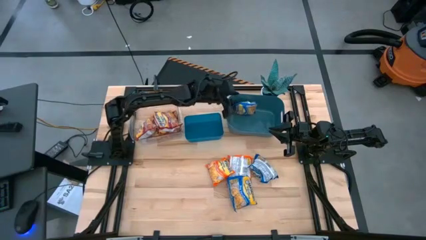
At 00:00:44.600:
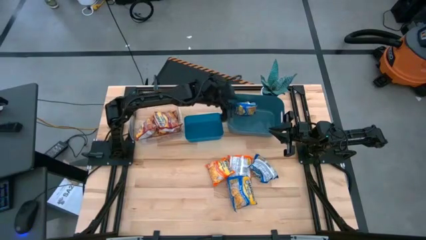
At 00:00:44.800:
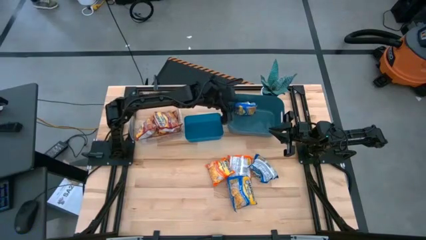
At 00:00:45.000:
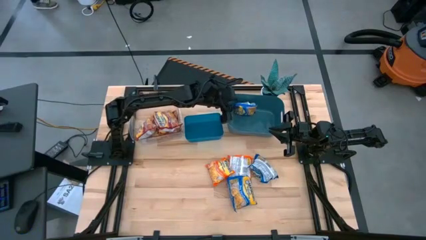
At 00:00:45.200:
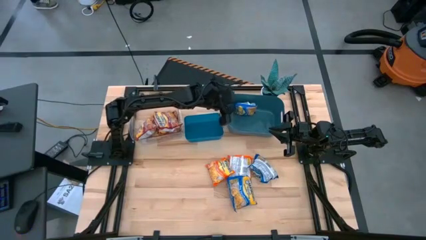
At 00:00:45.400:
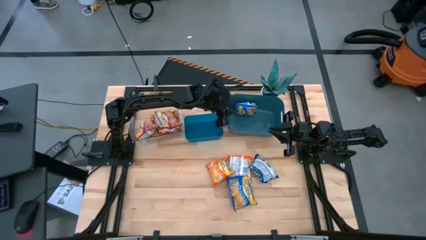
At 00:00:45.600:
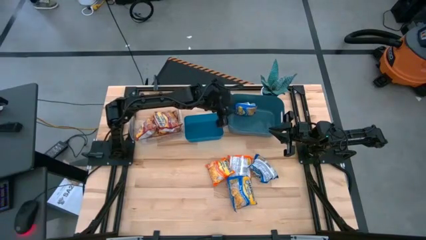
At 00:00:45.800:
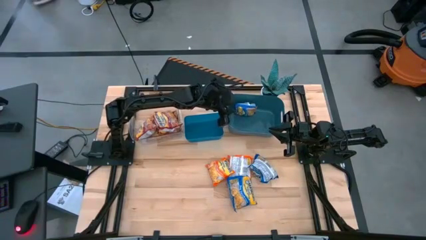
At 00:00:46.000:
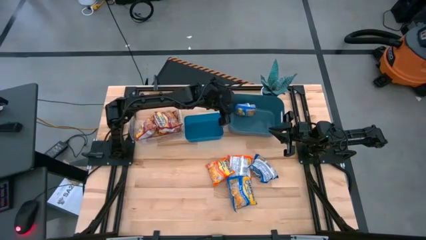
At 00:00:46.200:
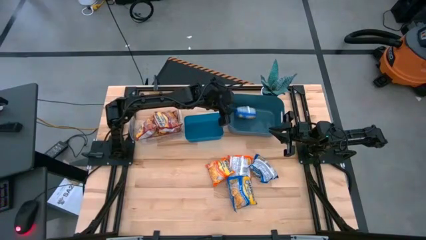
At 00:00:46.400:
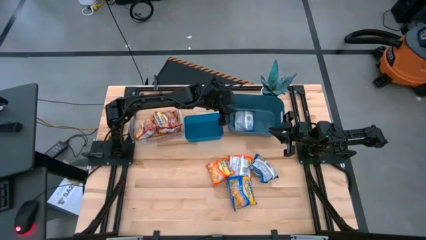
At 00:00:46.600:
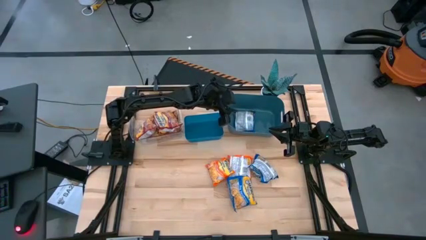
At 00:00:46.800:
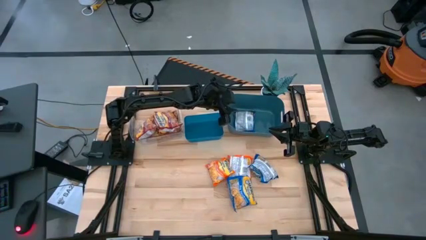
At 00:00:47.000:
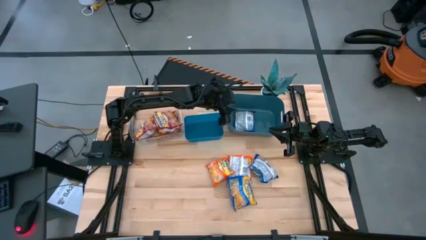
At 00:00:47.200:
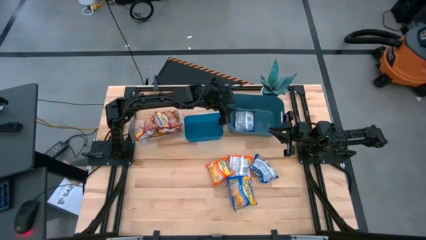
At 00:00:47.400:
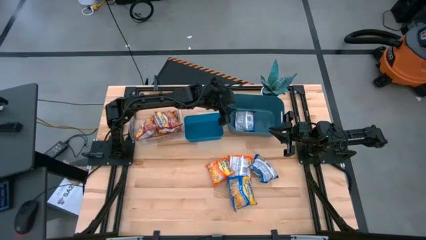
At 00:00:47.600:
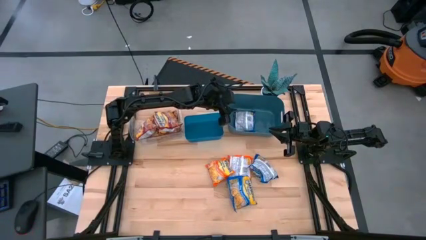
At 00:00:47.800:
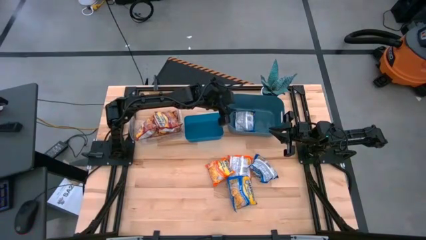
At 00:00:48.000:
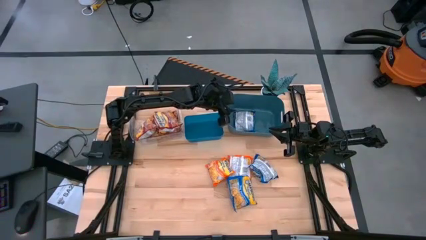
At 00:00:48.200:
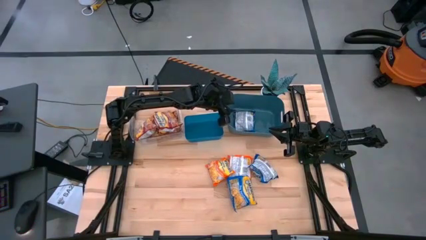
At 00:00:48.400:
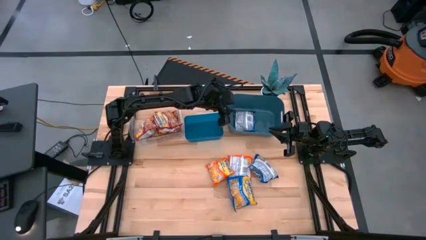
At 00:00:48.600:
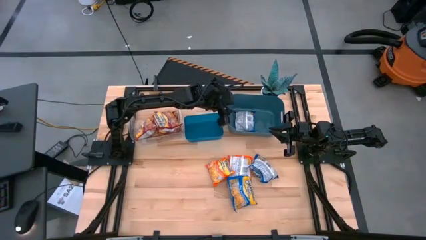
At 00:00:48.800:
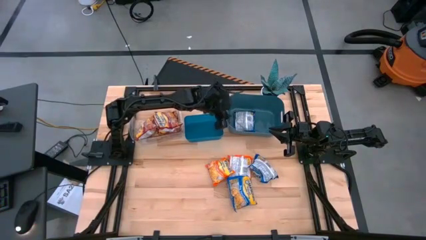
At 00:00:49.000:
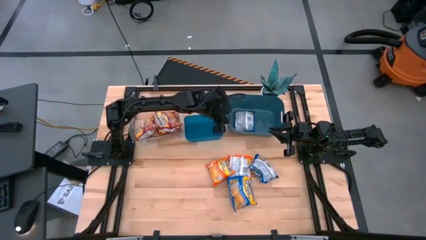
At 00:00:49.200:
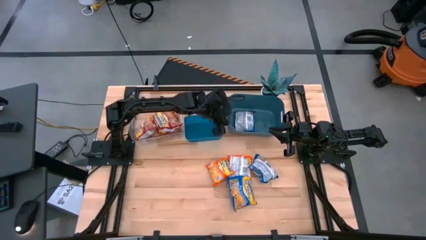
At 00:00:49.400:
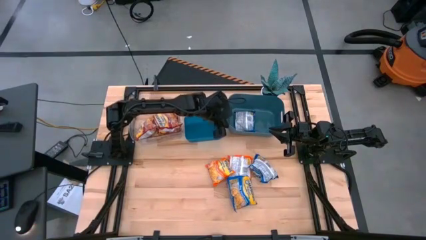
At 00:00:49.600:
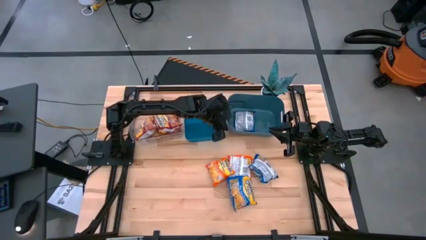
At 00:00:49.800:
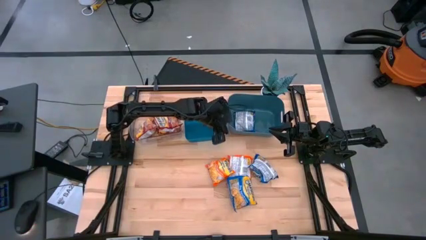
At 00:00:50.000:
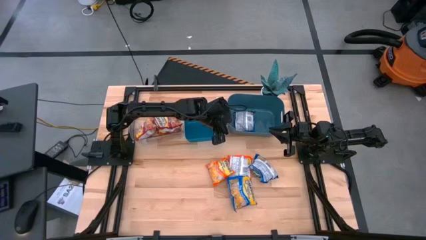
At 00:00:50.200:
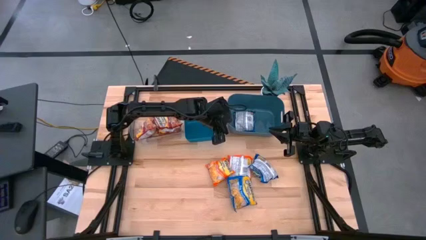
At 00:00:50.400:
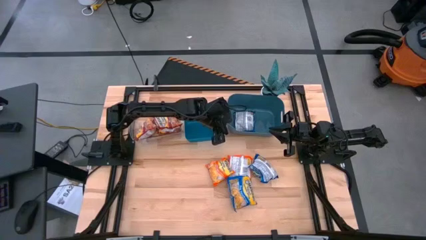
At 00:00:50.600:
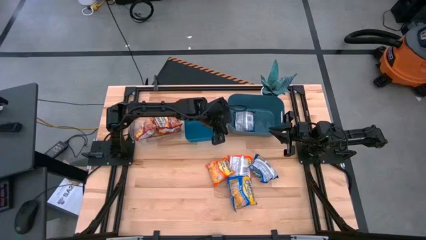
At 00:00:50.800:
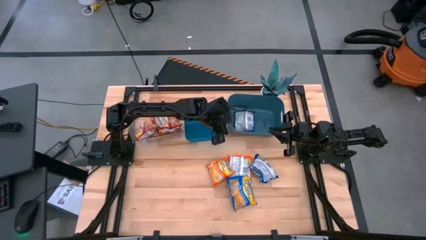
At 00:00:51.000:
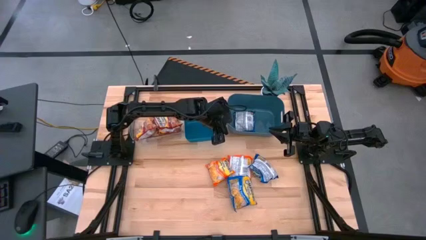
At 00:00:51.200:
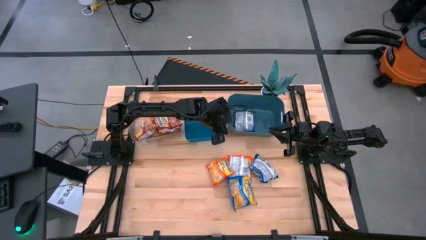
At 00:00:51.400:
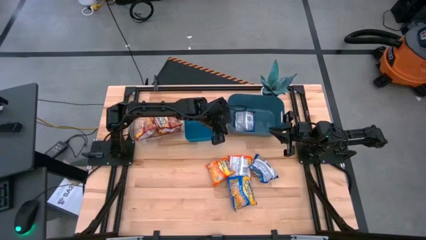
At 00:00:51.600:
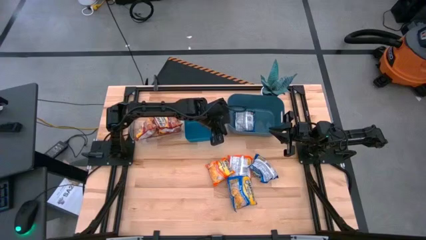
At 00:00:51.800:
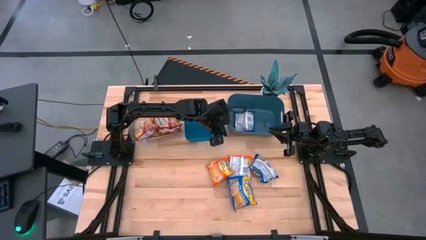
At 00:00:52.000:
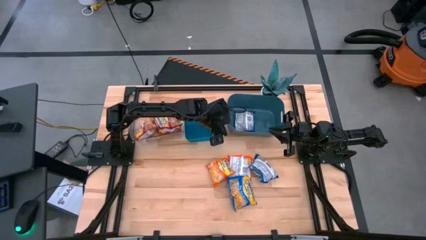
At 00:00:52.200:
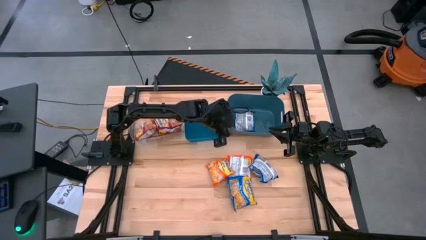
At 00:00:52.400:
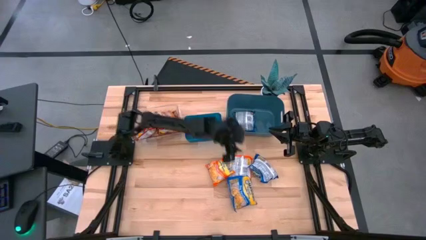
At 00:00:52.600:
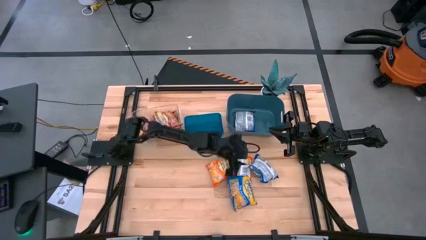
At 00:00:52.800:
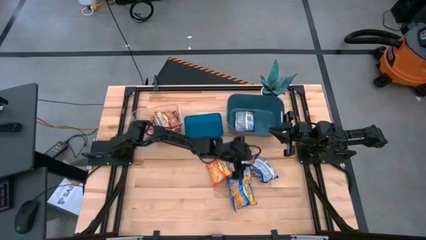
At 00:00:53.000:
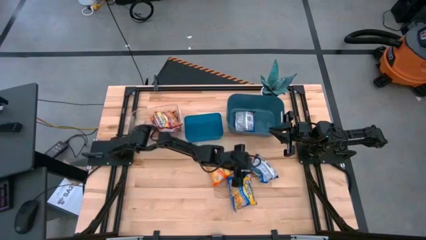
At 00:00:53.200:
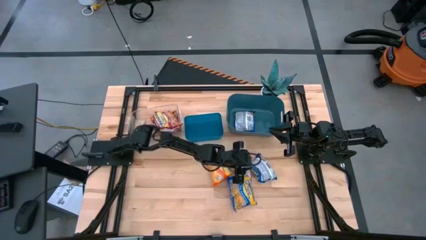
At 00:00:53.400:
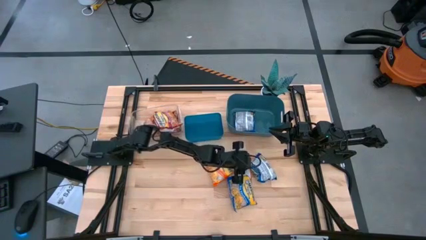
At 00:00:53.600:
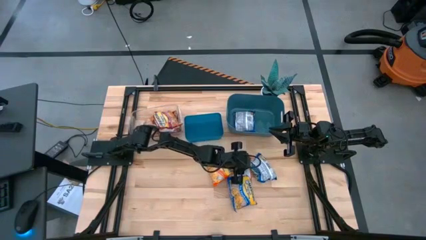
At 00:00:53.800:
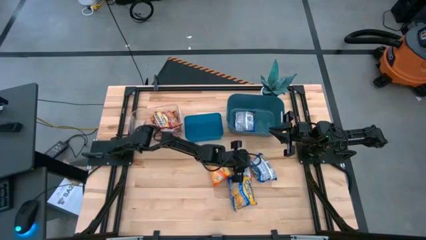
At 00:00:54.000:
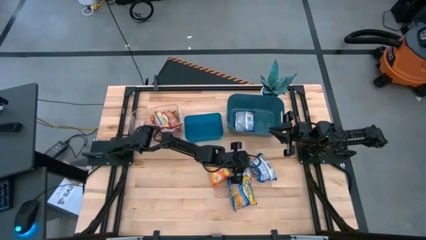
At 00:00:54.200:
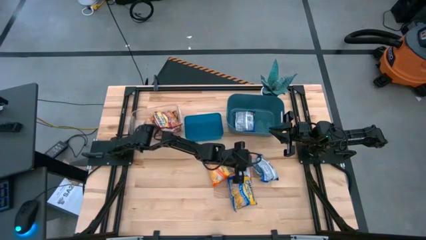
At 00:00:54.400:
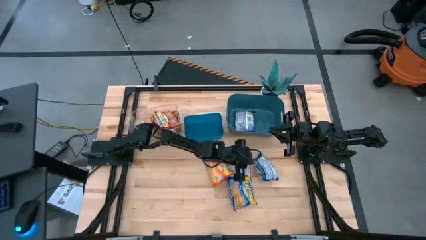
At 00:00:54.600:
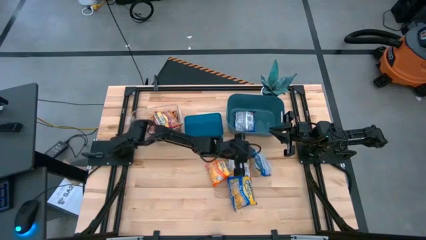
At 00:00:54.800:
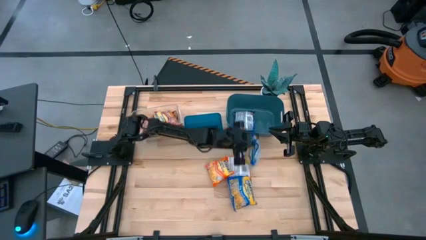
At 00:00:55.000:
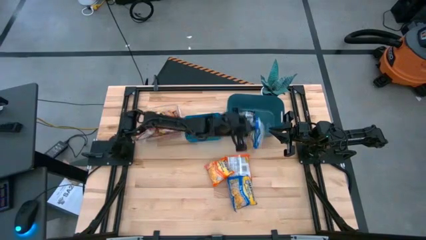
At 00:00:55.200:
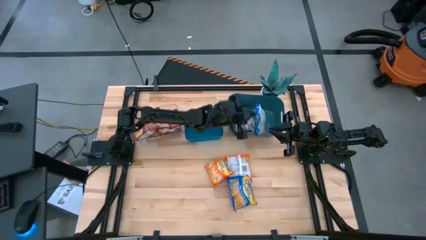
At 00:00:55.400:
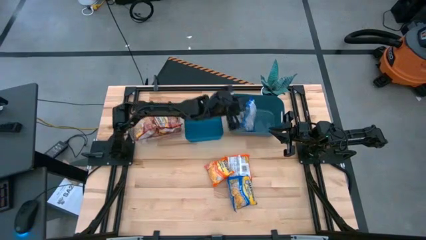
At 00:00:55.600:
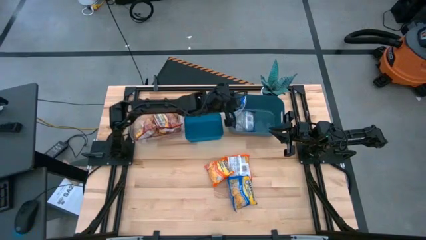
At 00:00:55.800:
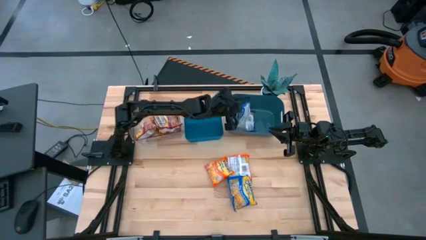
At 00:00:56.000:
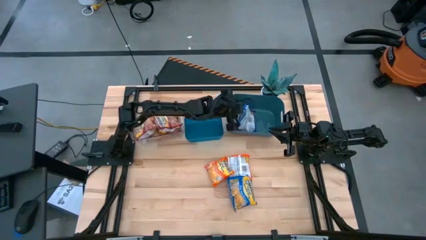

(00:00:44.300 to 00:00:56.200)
Task: Sort Maruchan noodles
Put the blue noodle pack into the green bin

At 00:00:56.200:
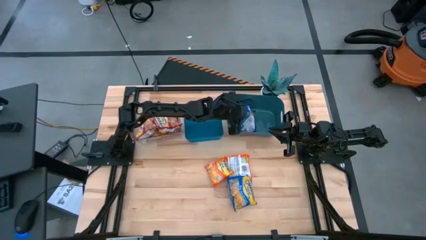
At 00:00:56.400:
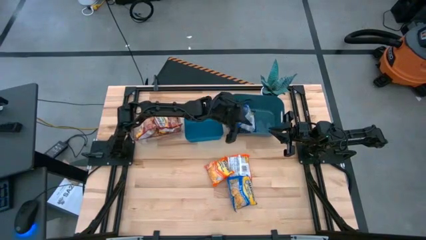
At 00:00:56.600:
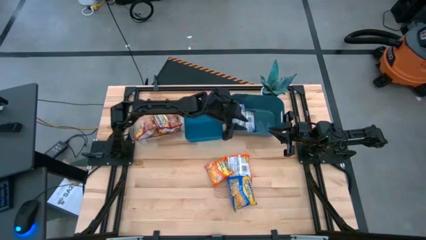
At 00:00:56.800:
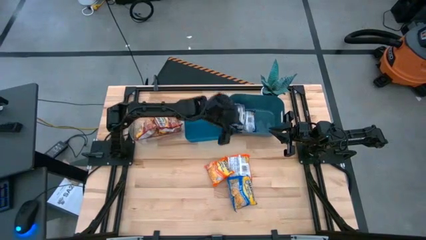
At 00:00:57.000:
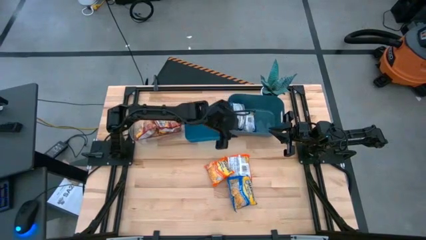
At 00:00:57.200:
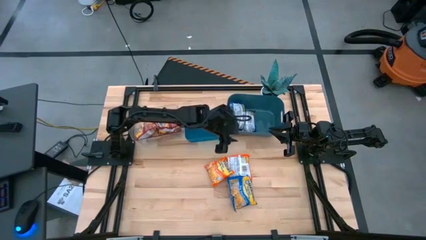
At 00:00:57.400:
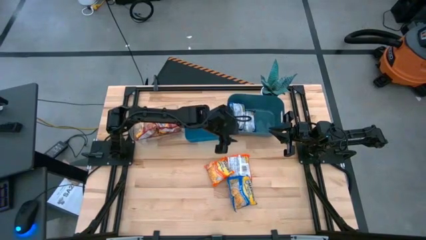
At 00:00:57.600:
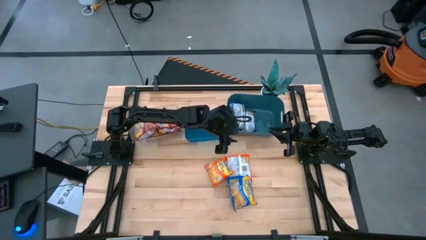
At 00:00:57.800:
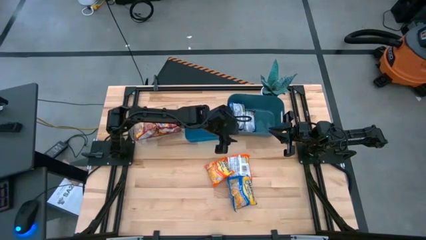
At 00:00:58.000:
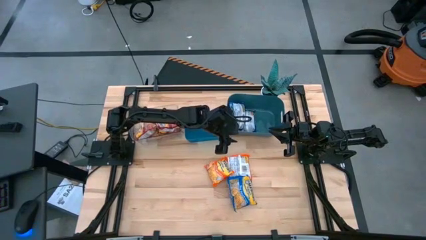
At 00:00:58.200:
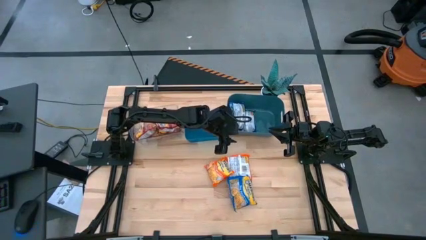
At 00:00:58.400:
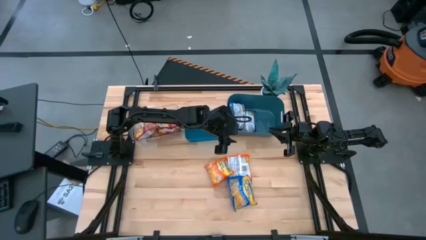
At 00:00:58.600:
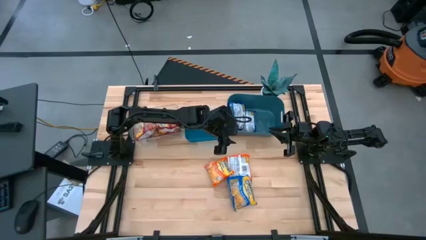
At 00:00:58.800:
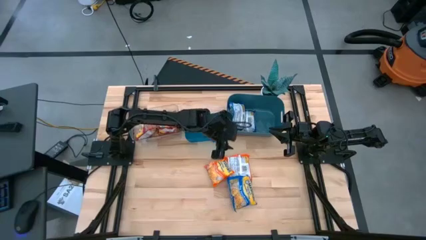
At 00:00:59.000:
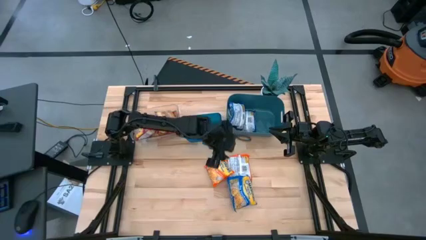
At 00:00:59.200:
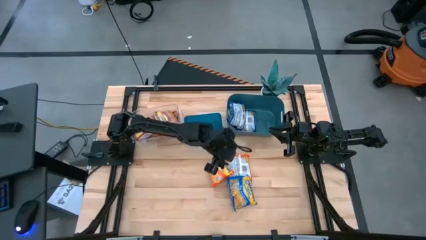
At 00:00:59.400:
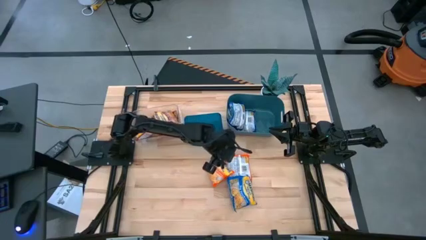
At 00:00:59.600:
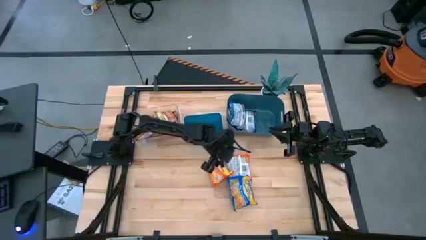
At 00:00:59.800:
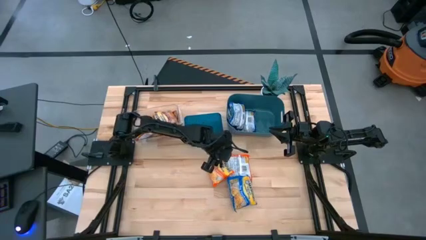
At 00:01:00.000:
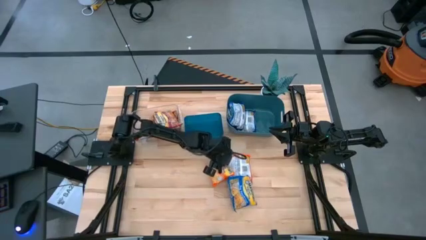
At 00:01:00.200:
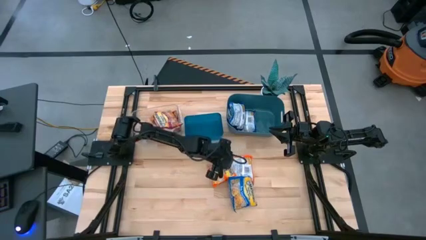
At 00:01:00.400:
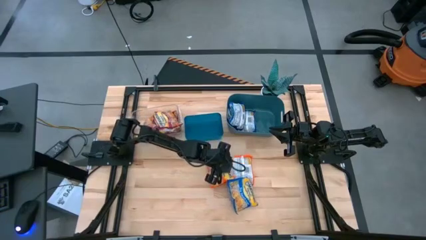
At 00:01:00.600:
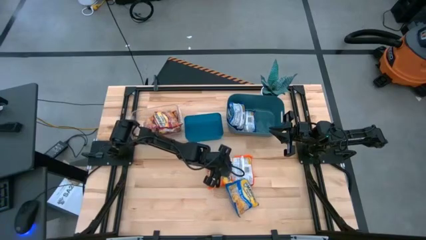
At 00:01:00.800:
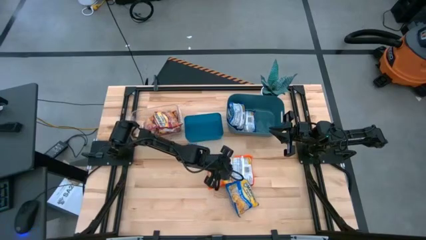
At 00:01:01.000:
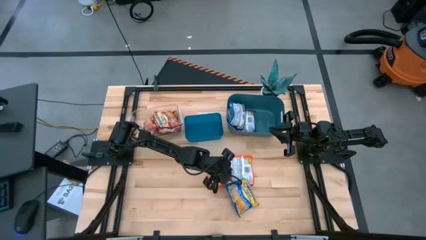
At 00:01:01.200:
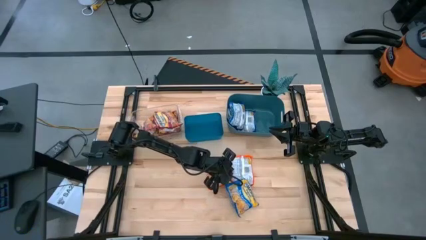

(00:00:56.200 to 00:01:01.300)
Move the orange noodle pack to the bottom
